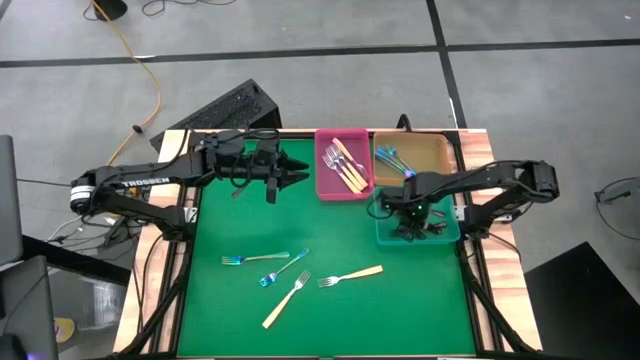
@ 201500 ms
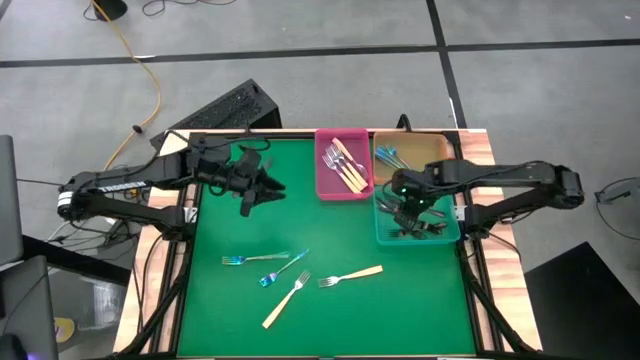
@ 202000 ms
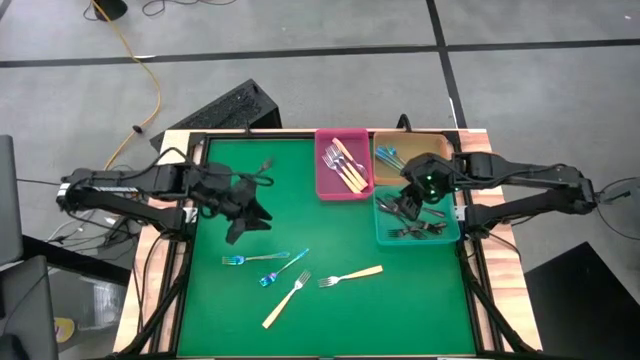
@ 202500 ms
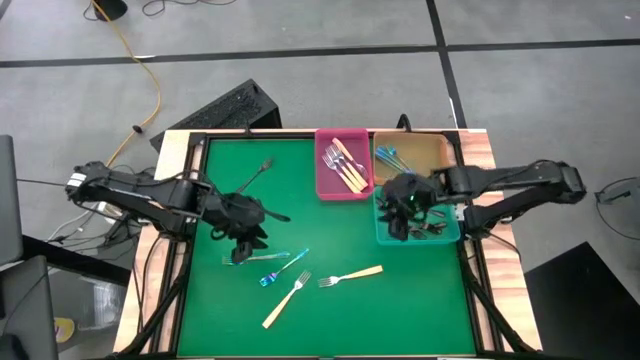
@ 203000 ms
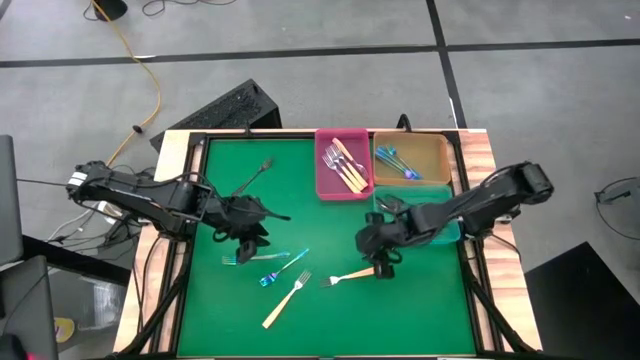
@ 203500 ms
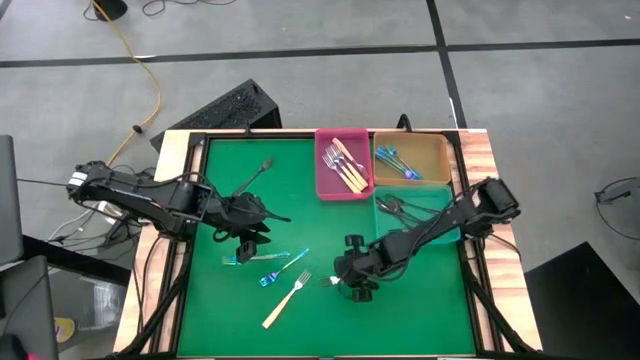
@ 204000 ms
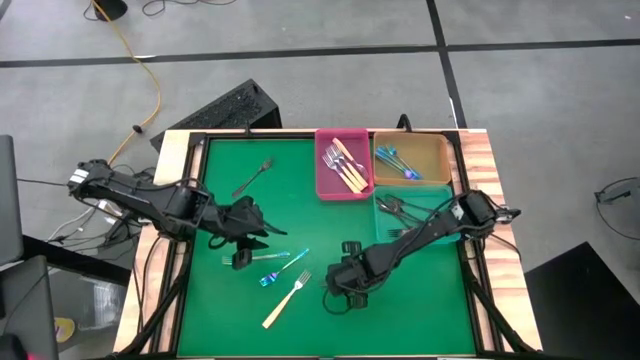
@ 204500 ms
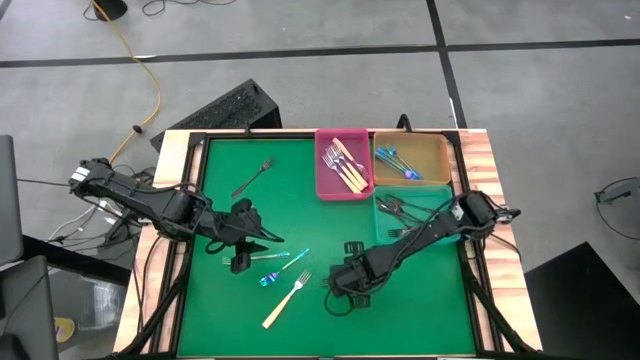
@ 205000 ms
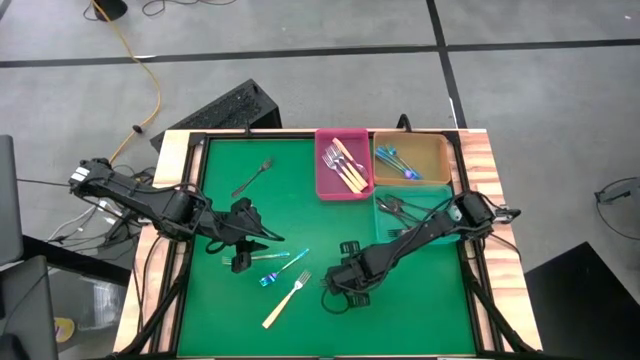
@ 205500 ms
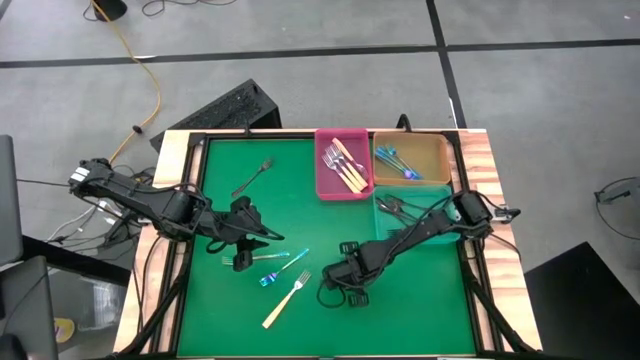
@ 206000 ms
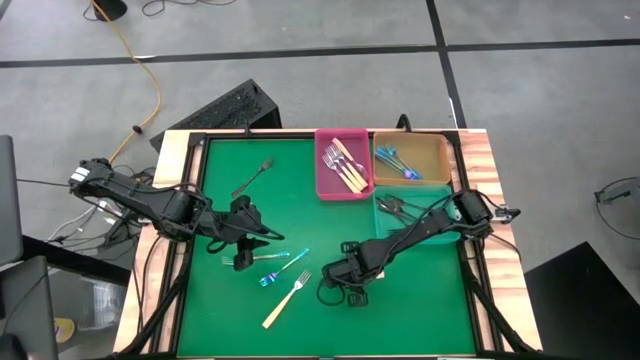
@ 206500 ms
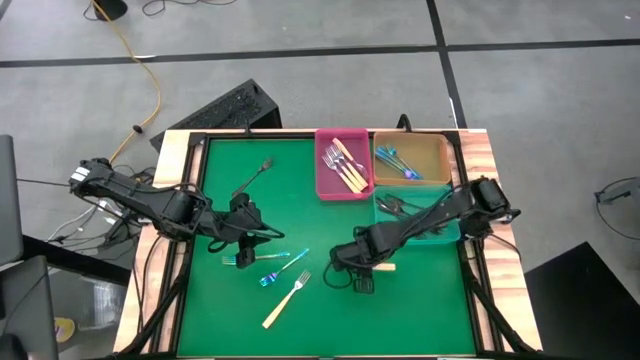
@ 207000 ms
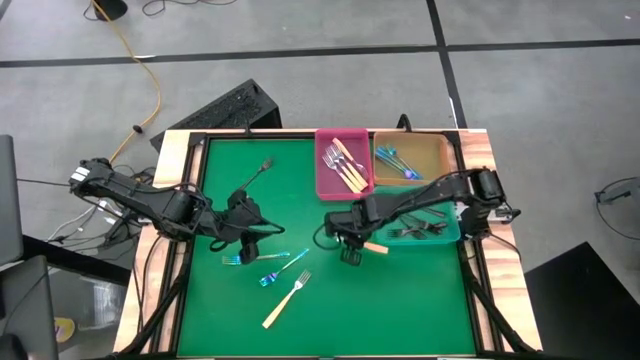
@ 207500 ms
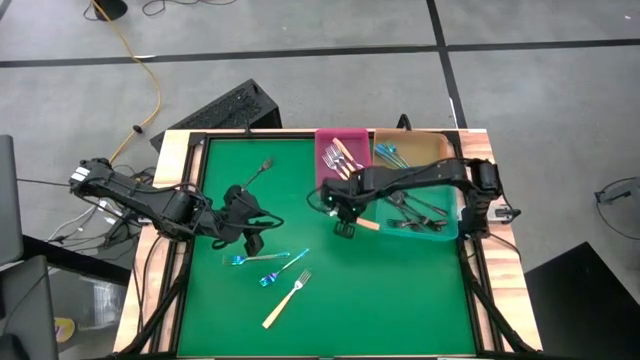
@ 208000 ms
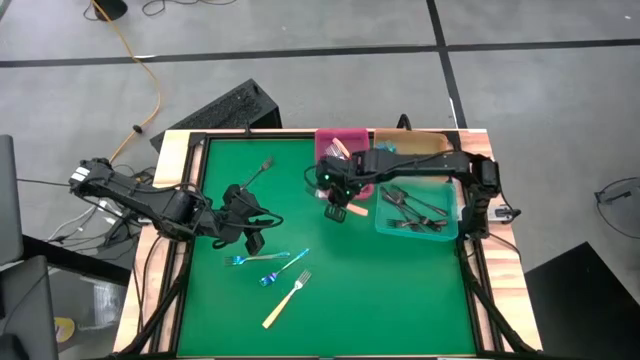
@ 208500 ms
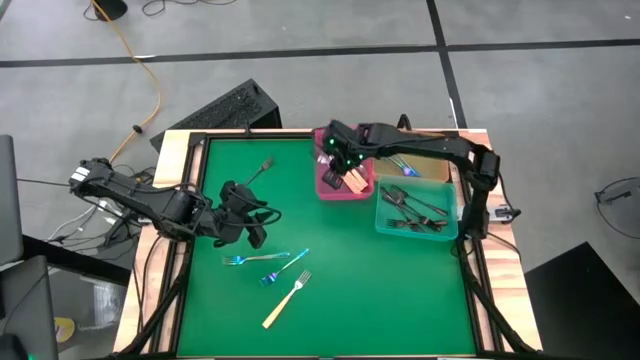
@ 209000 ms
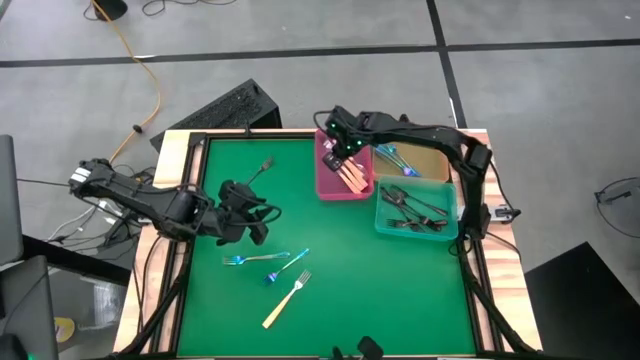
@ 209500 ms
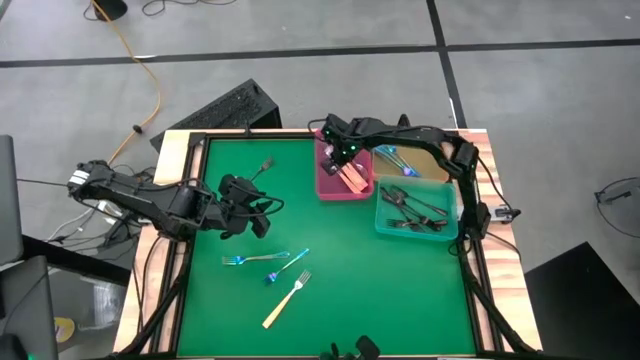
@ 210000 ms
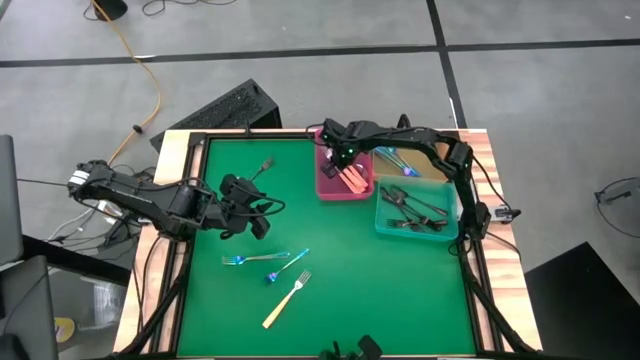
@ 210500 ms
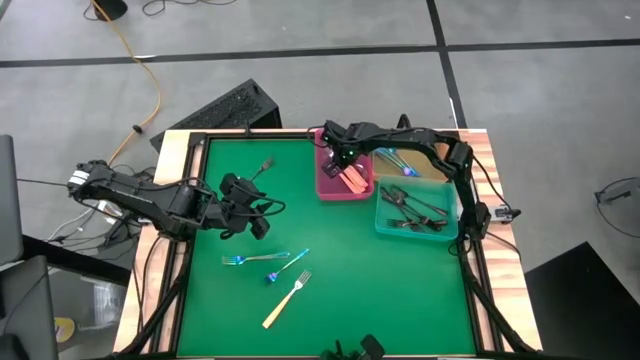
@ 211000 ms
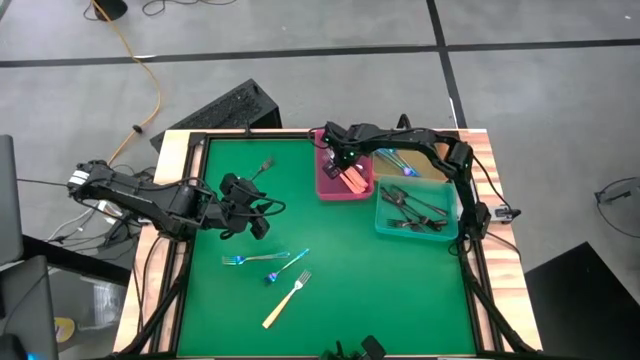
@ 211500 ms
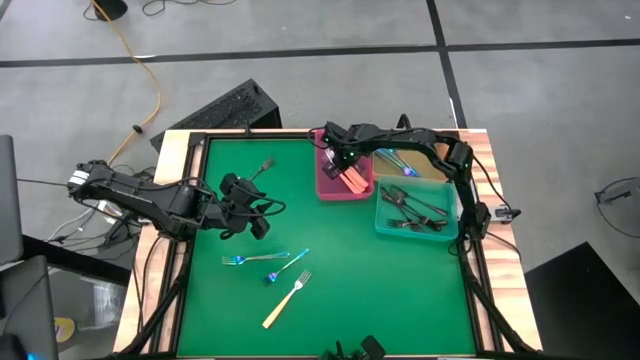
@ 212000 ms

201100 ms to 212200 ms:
Task: Sort silverware by color (type)
Put the yellow fork into the pink bin

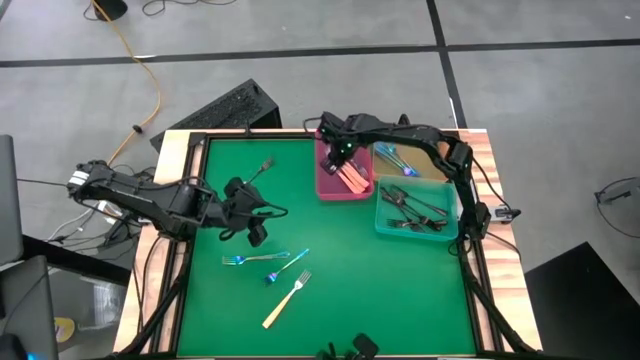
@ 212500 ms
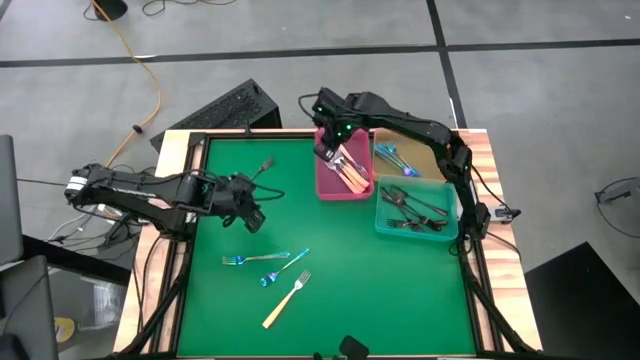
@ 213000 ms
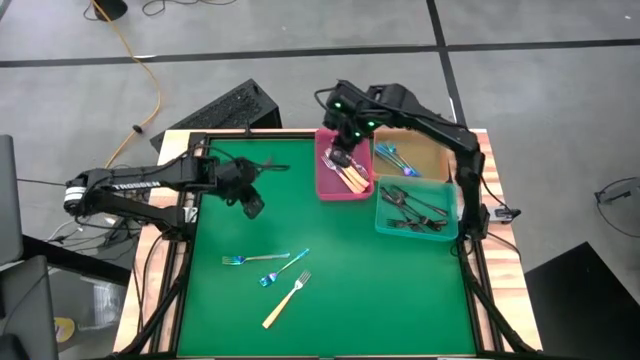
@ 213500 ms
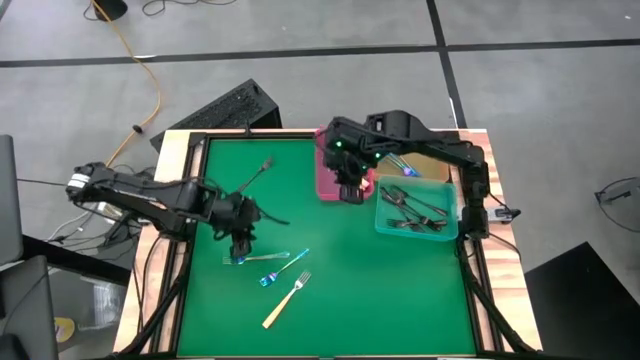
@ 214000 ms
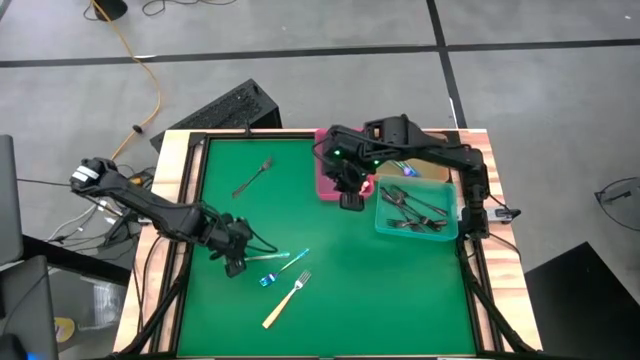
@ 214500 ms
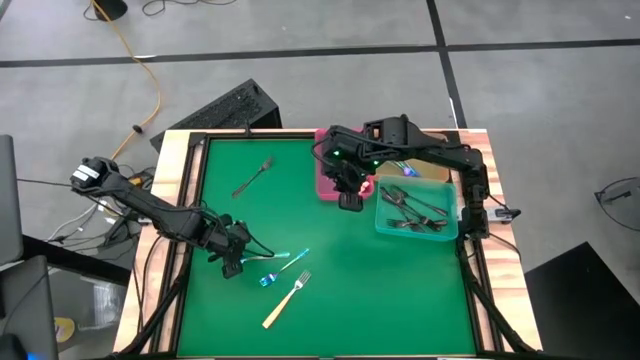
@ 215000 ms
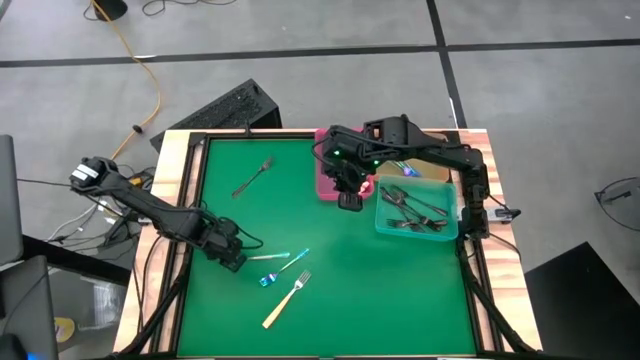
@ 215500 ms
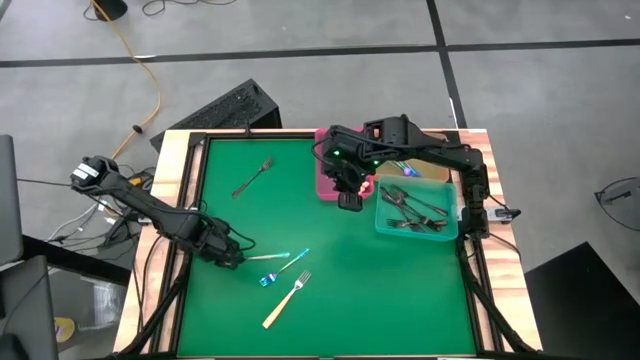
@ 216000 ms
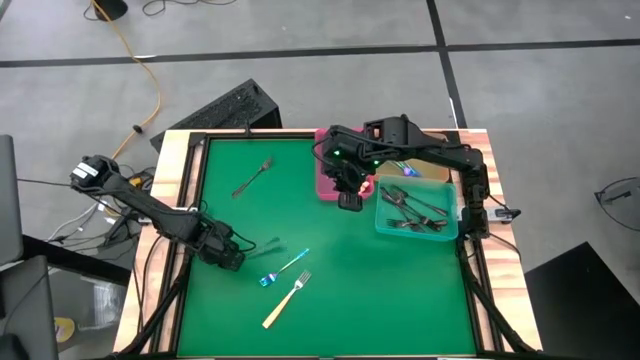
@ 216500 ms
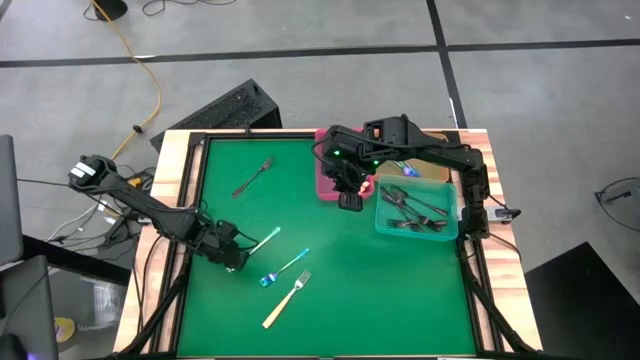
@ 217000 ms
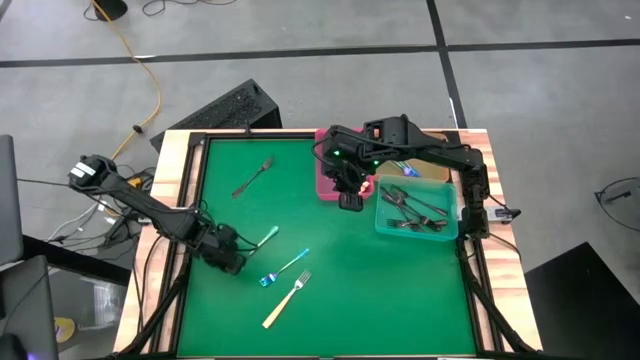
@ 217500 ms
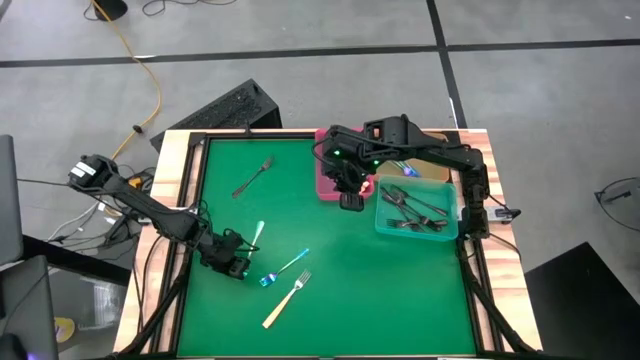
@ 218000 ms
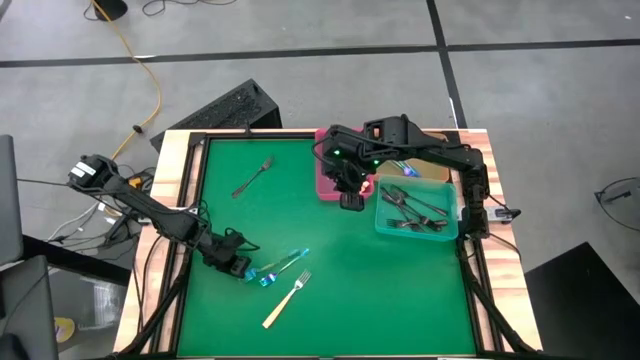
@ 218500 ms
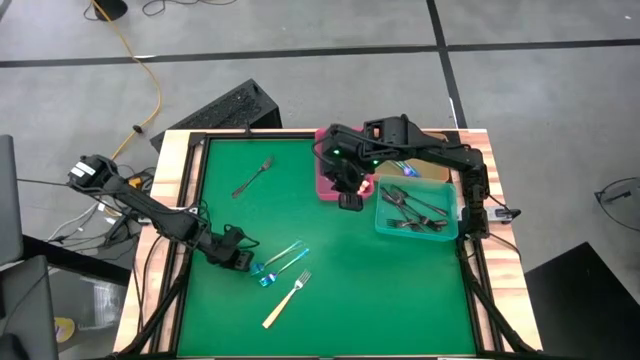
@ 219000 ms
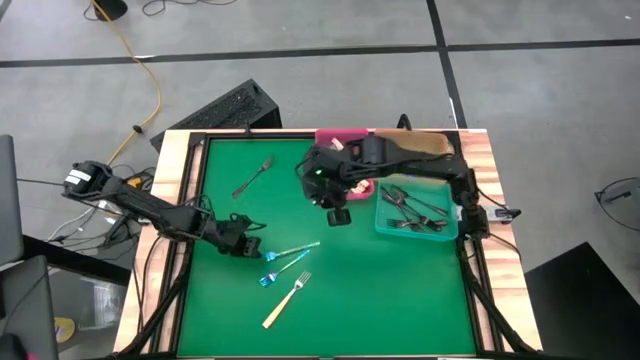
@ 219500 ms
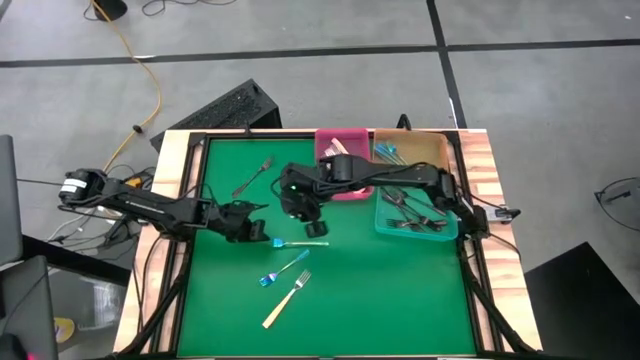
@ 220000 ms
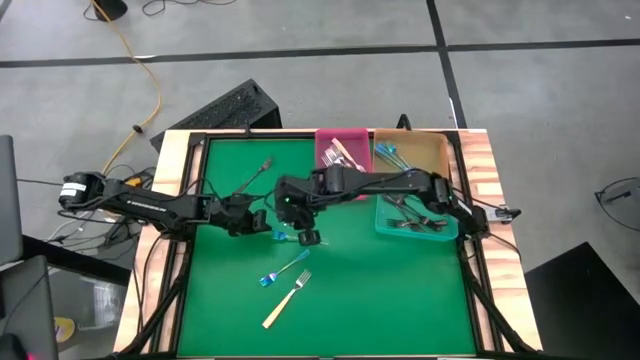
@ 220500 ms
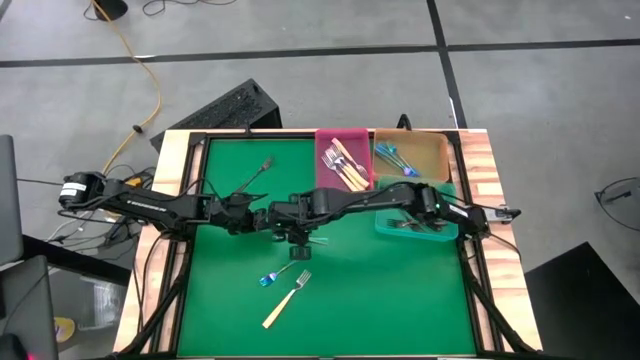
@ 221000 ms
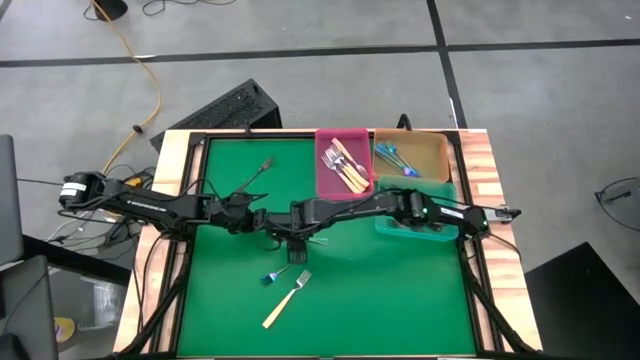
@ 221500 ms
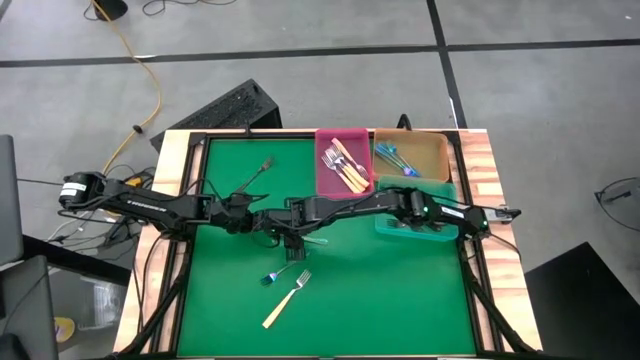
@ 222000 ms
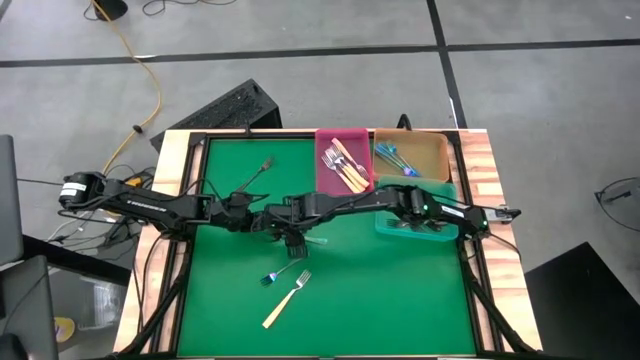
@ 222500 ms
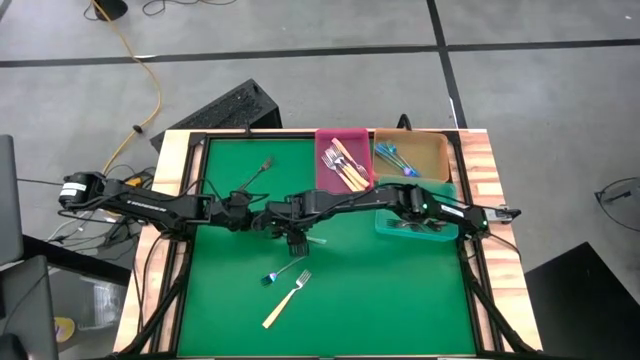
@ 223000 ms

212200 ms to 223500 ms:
Put the blue fork into the orange bin
